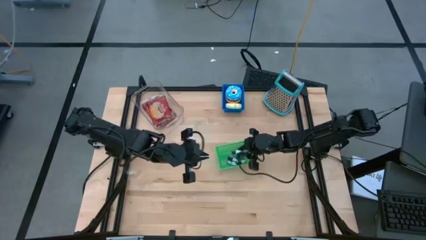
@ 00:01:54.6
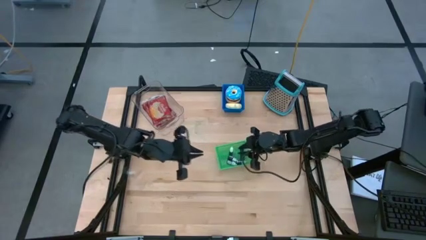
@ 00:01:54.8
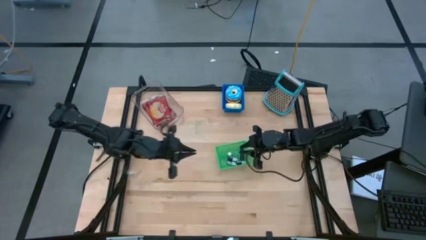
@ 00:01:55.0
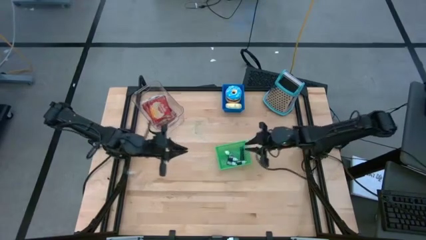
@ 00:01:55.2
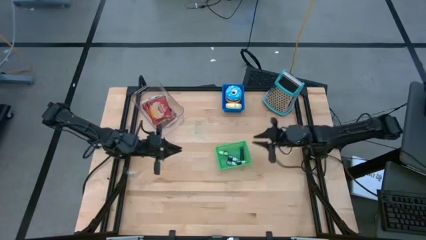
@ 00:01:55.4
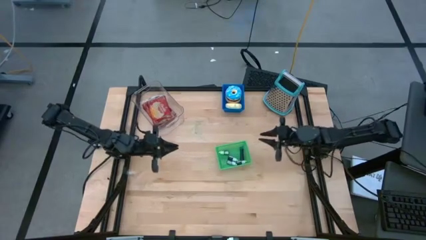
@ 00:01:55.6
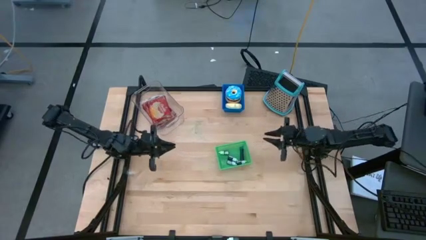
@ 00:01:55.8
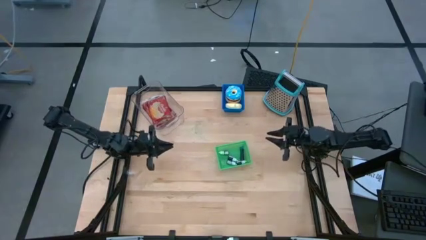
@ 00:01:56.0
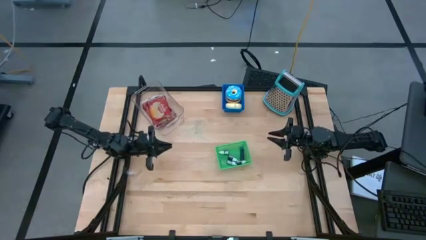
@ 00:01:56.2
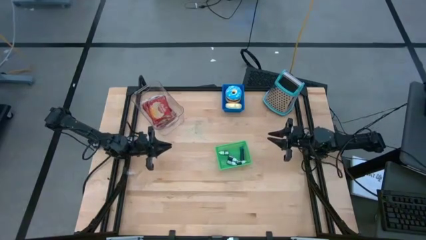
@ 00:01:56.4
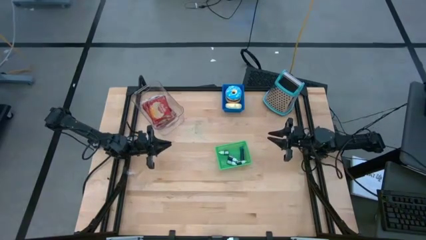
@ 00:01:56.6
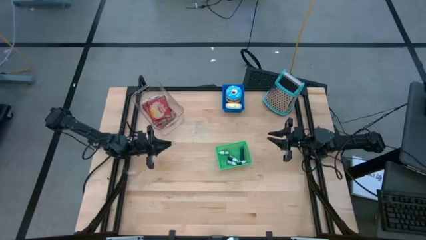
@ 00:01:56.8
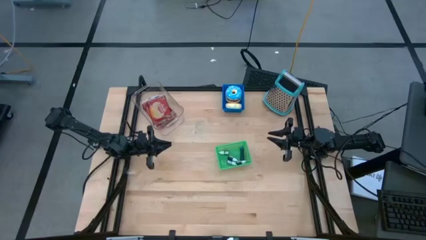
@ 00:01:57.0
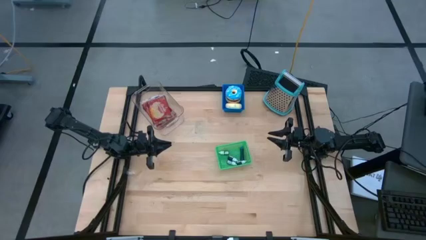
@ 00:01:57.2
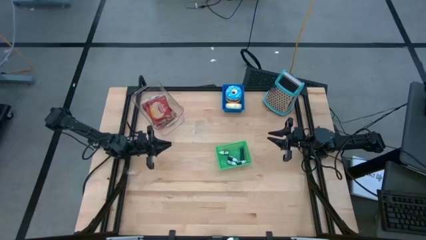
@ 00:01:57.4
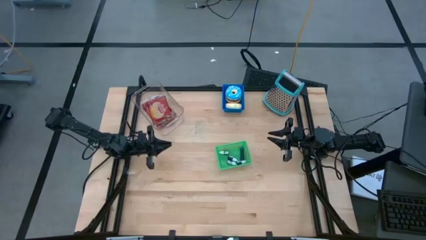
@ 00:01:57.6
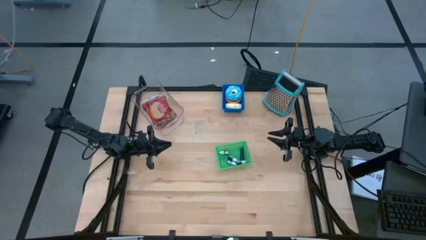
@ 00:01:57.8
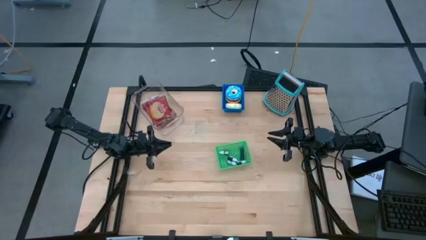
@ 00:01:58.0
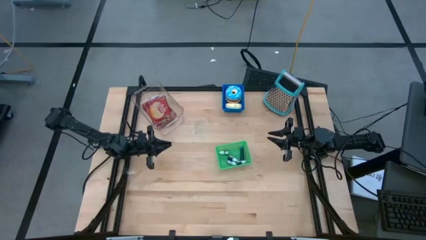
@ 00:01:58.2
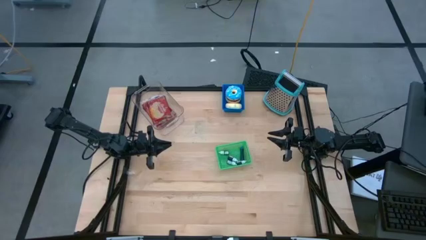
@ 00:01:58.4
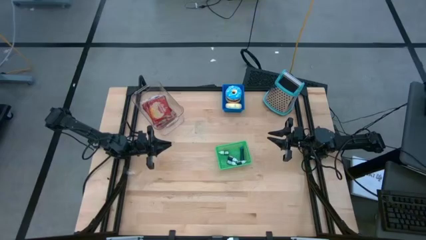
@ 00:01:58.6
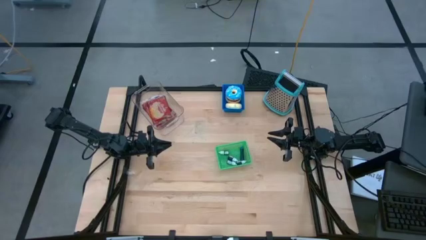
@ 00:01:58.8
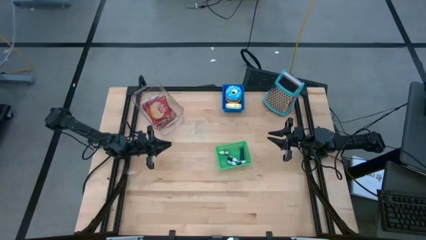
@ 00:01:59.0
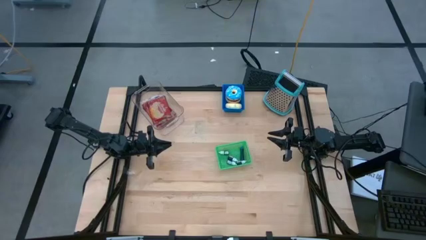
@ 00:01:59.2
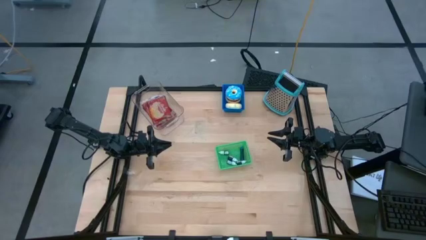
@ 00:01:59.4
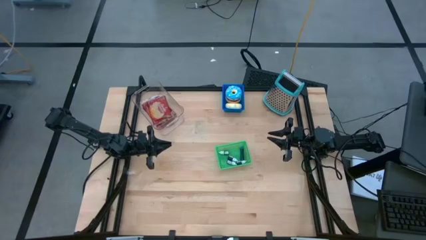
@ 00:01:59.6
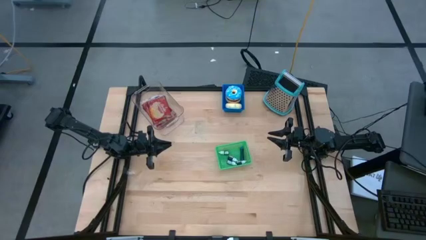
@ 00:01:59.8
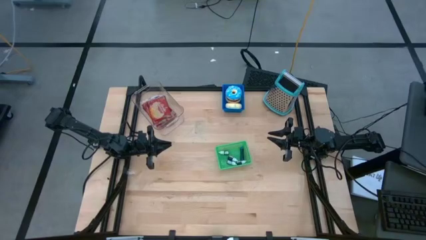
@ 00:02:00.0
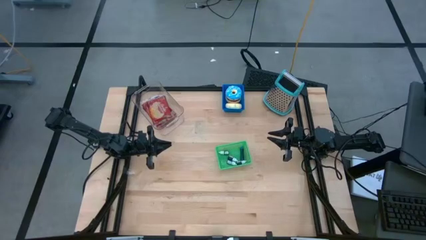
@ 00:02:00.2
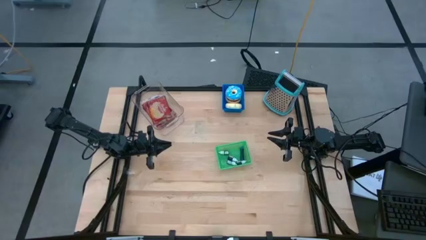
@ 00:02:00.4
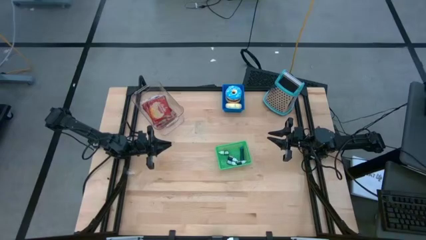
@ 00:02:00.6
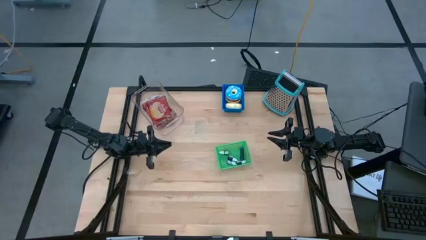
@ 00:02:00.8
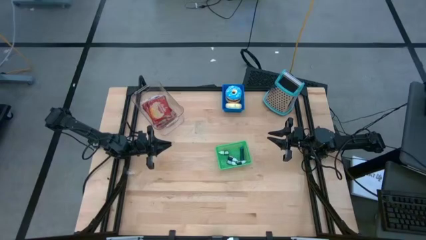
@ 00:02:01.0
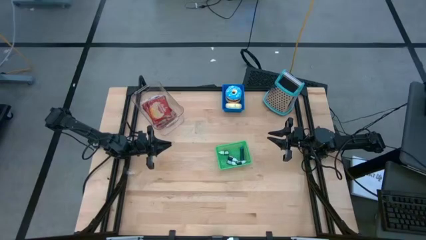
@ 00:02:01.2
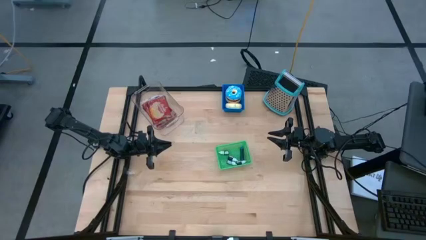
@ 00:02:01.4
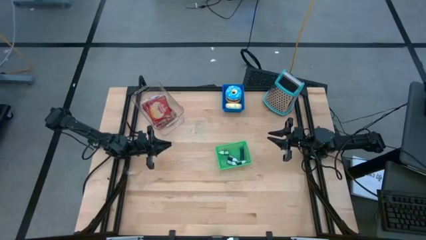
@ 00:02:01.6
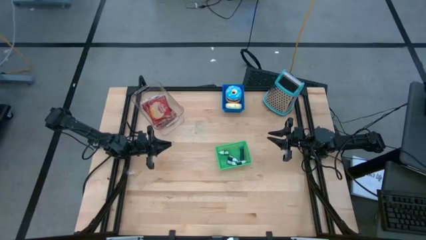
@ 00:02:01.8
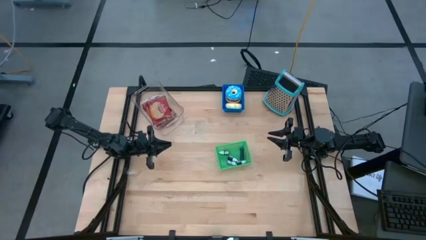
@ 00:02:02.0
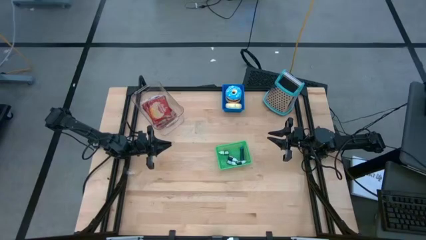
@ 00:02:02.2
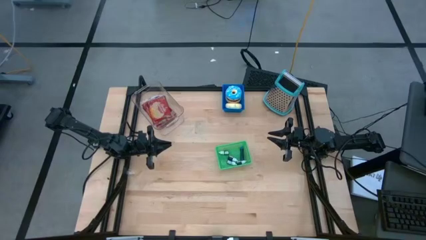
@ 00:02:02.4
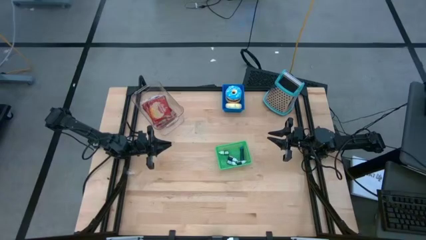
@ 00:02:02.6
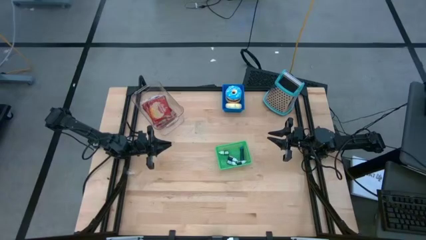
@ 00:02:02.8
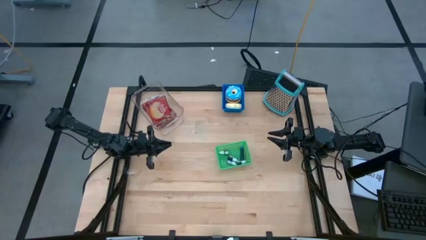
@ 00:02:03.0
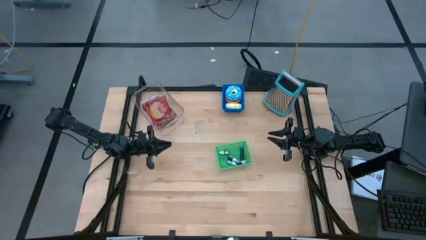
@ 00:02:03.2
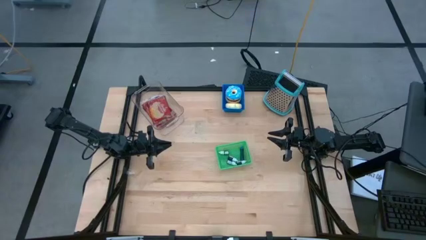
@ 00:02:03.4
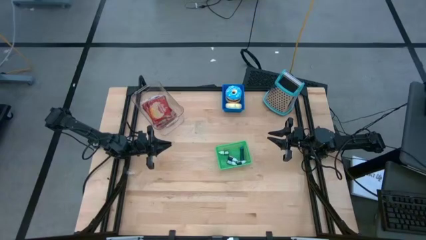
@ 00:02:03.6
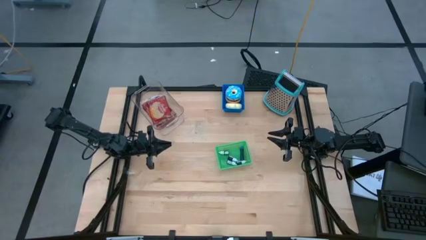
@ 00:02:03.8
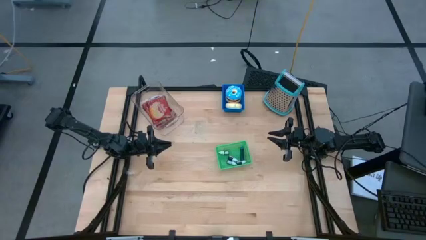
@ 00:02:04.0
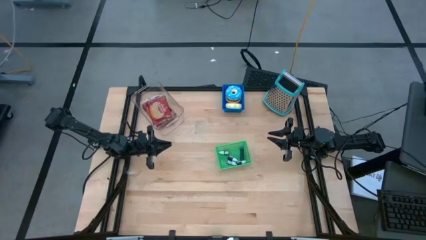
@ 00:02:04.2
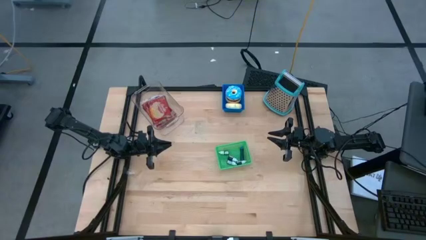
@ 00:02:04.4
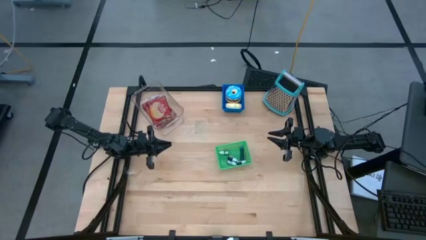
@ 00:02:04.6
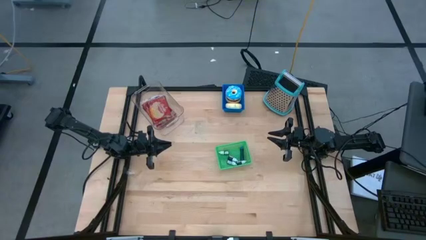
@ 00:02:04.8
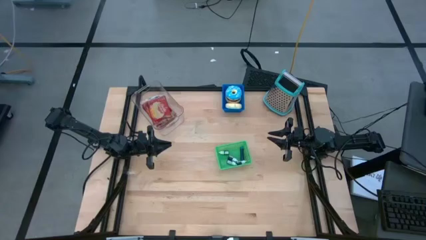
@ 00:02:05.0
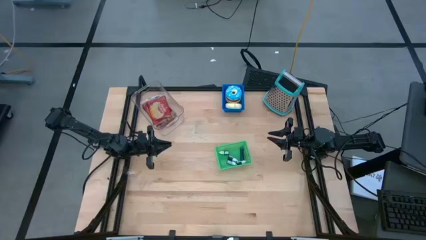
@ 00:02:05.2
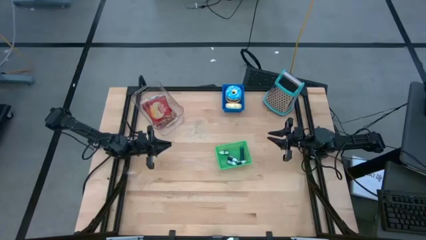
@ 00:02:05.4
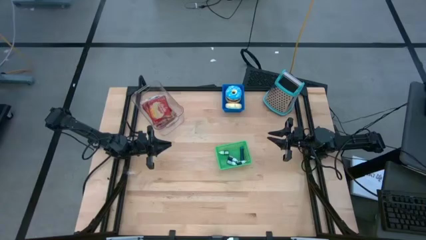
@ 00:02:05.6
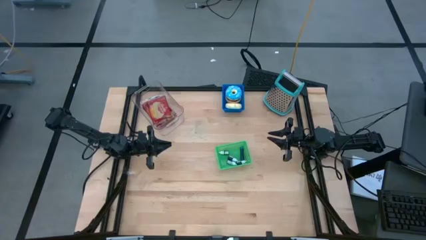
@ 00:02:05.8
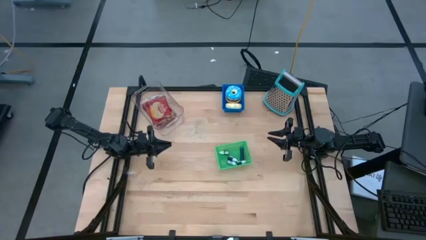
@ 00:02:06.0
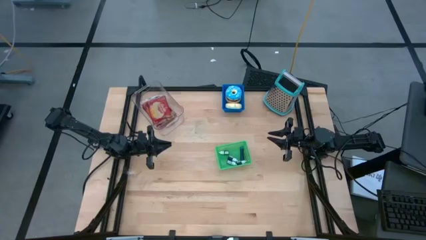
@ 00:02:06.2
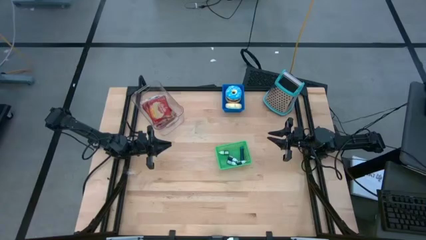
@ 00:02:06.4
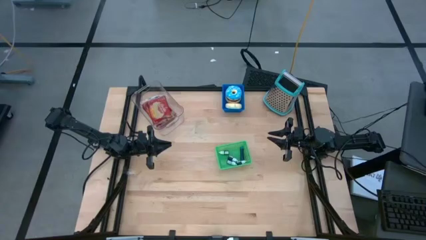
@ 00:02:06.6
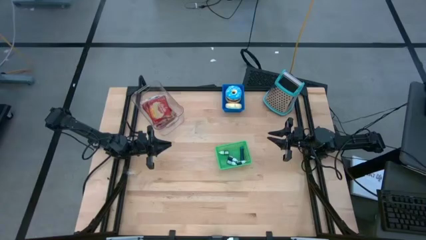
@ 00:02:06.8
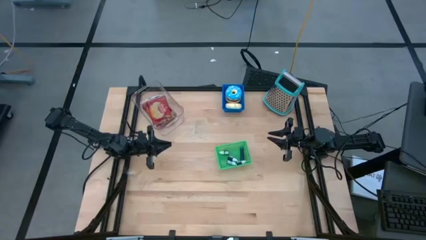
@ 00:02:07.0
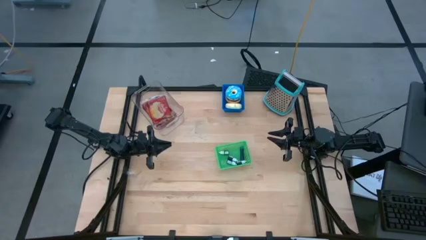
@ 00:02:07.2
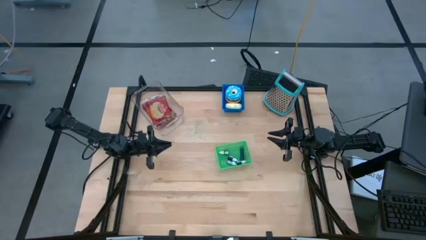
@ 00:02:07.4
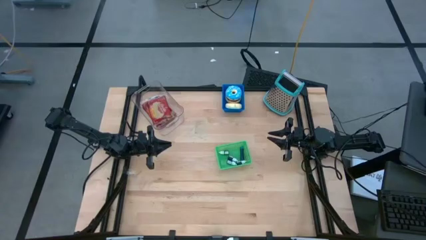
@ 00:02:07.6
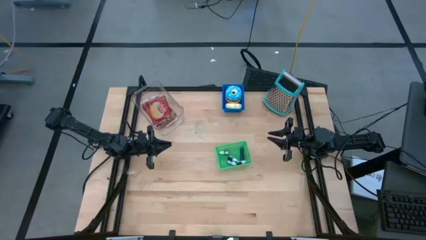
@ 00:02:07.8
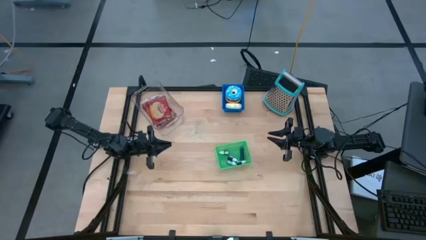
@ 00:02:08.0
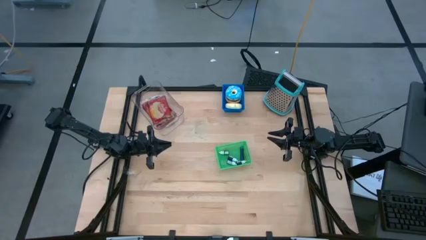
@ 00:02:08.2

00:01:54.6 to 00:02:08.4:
Return to Home Position
